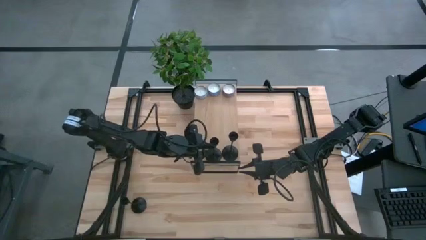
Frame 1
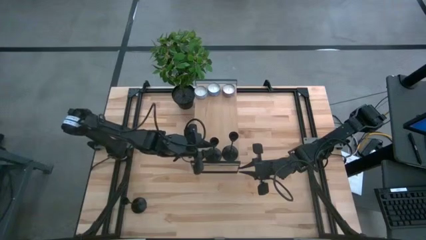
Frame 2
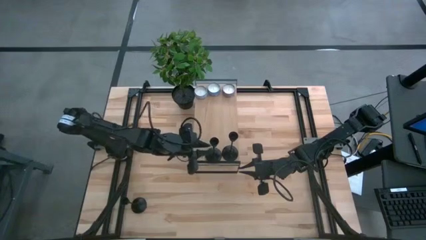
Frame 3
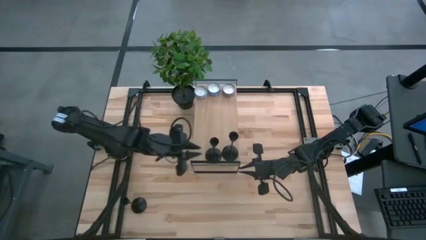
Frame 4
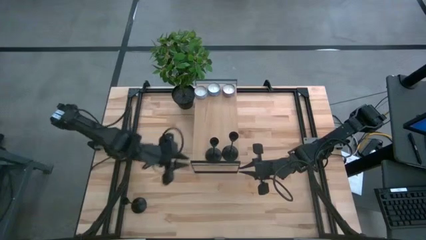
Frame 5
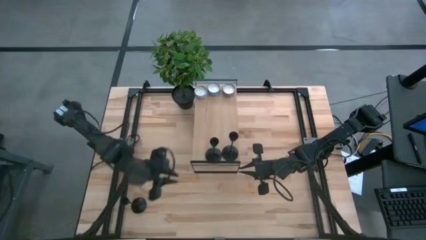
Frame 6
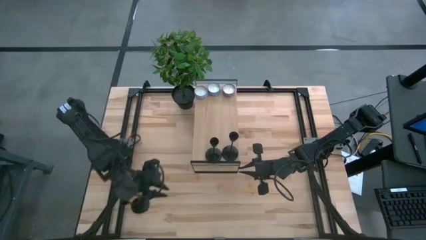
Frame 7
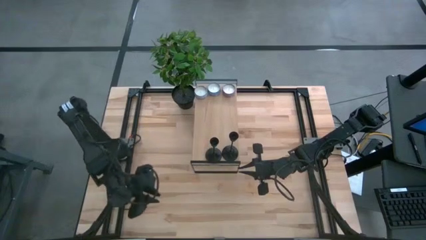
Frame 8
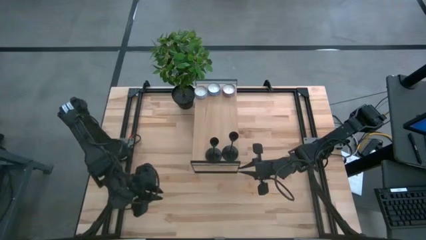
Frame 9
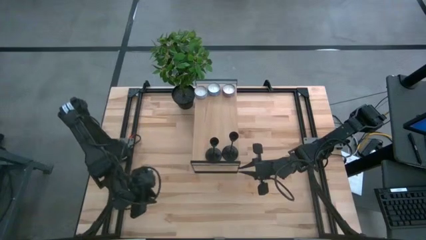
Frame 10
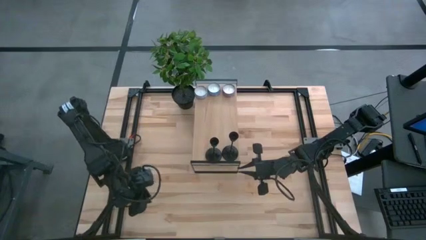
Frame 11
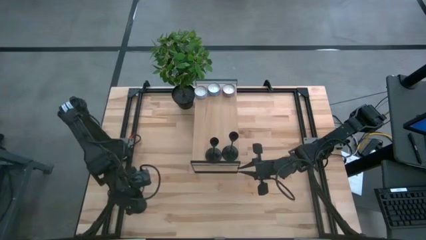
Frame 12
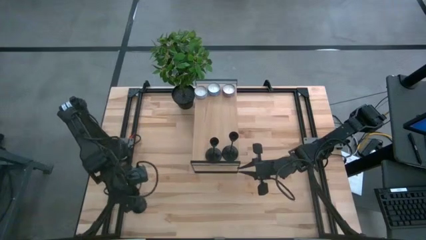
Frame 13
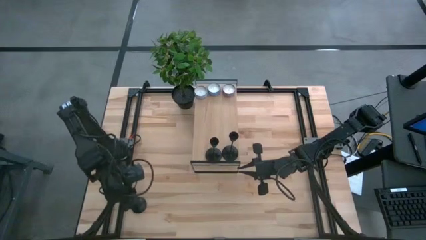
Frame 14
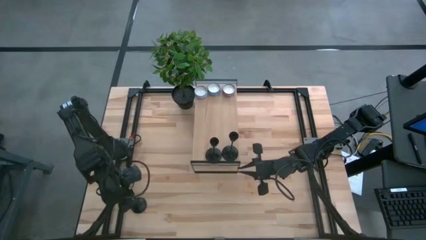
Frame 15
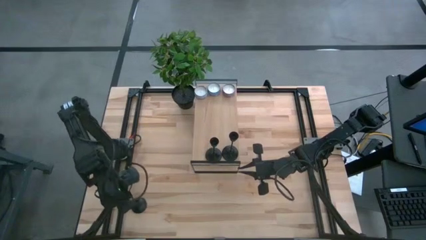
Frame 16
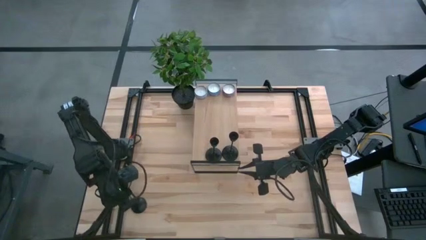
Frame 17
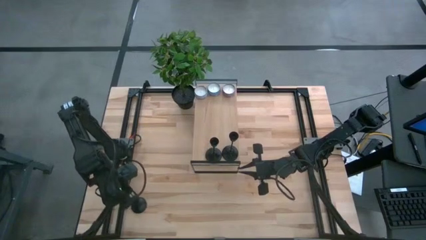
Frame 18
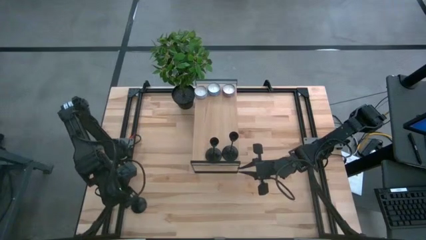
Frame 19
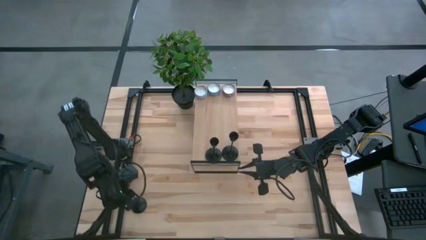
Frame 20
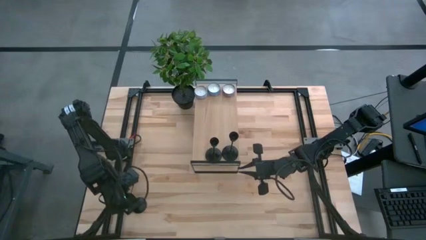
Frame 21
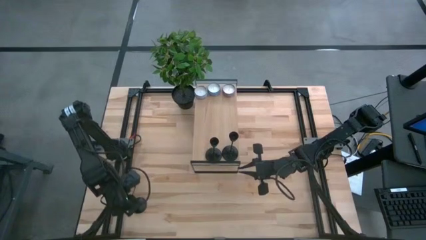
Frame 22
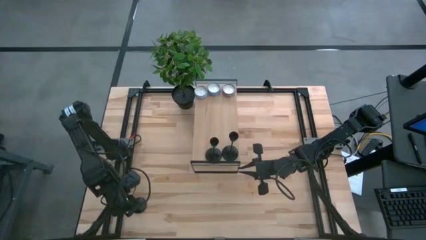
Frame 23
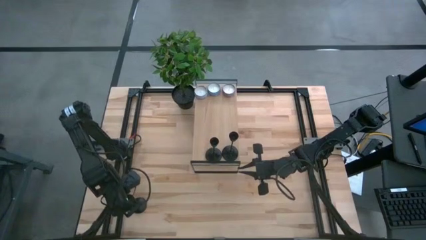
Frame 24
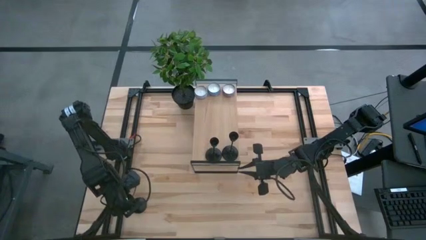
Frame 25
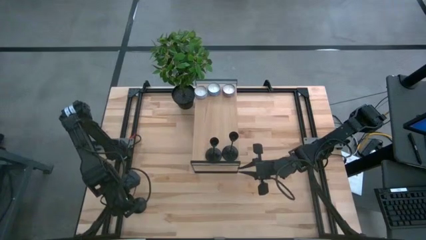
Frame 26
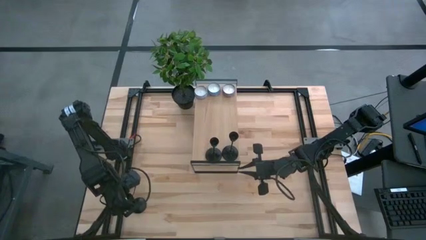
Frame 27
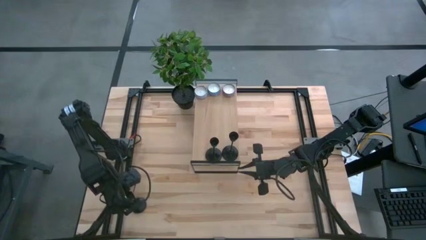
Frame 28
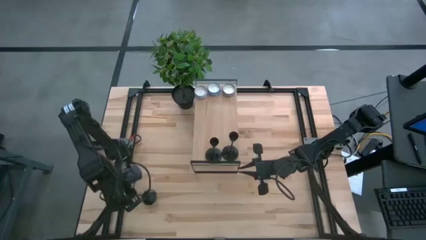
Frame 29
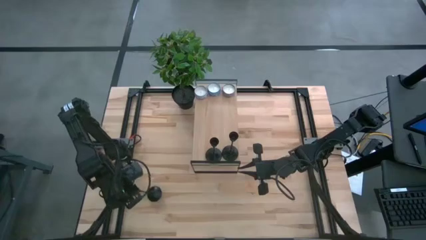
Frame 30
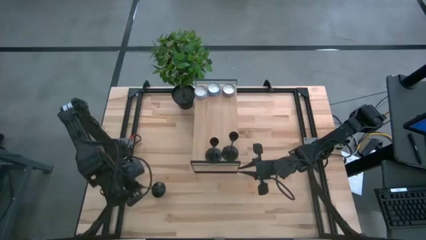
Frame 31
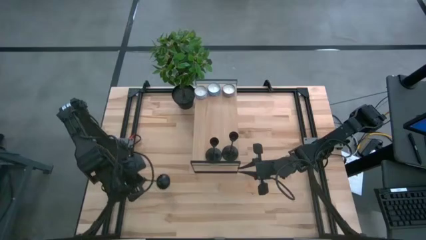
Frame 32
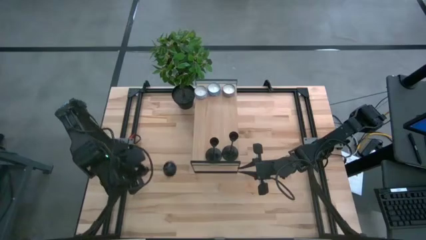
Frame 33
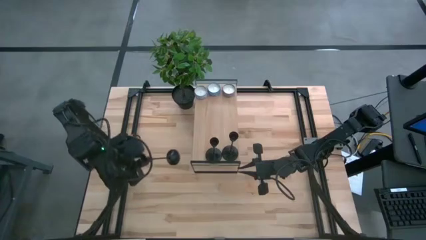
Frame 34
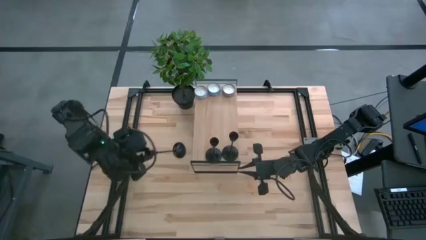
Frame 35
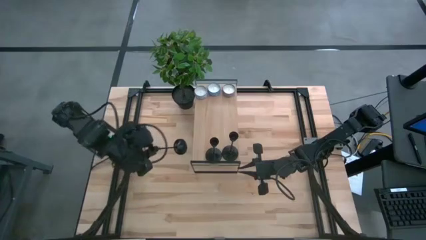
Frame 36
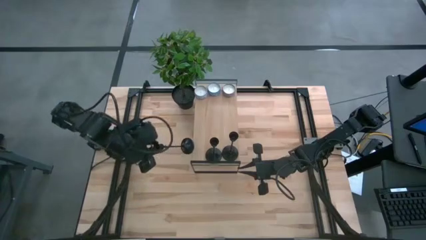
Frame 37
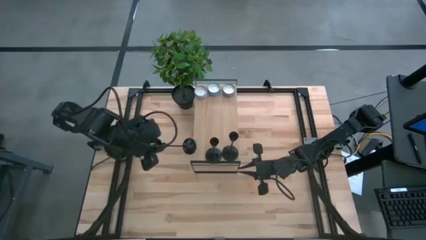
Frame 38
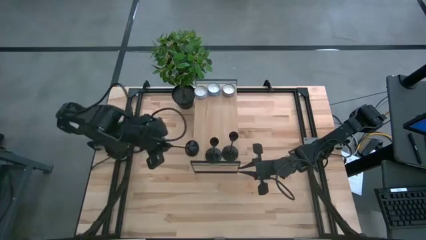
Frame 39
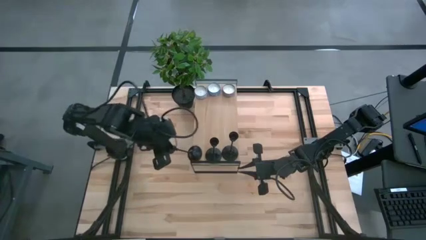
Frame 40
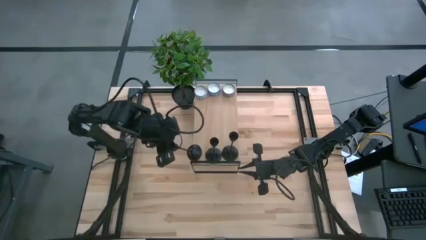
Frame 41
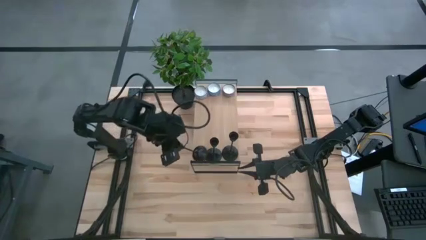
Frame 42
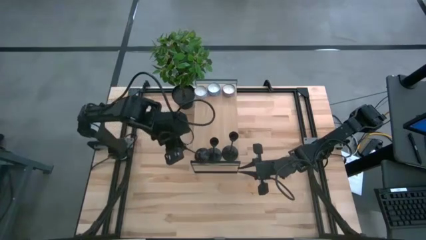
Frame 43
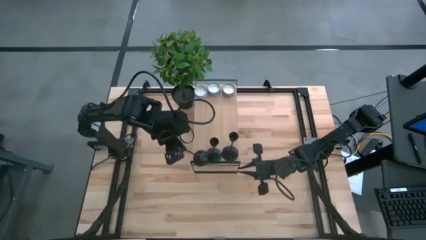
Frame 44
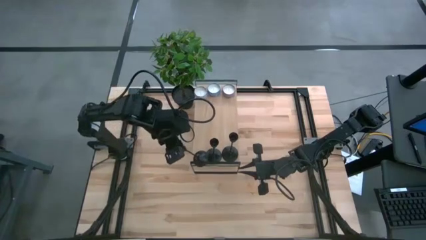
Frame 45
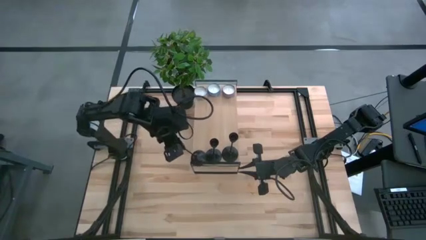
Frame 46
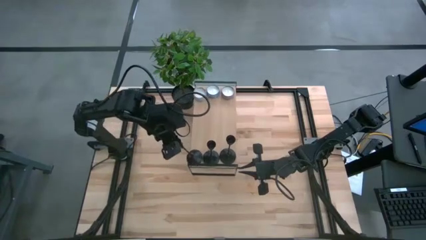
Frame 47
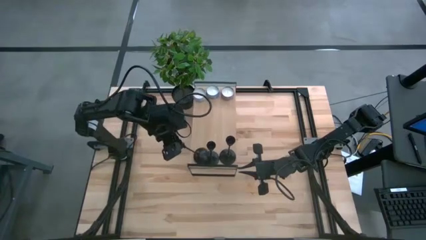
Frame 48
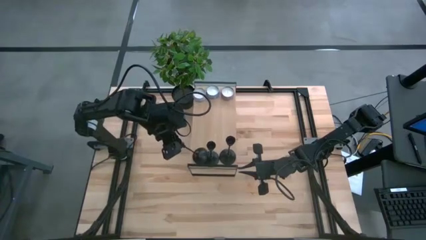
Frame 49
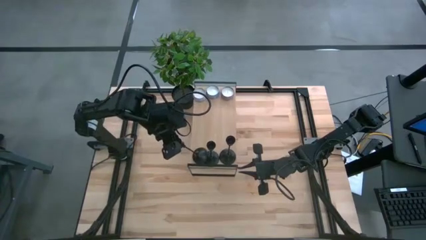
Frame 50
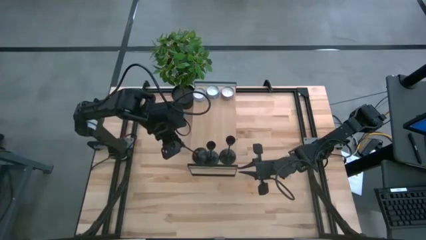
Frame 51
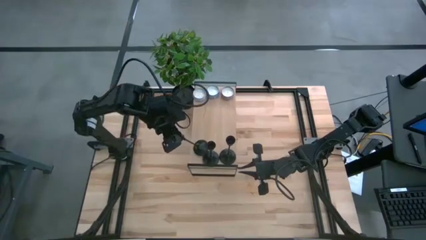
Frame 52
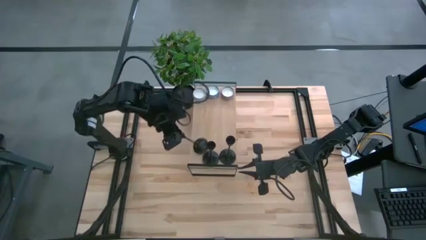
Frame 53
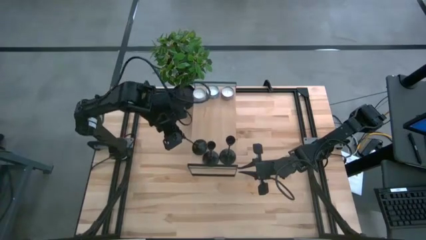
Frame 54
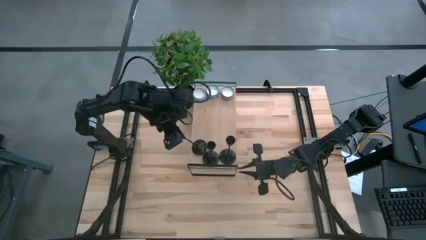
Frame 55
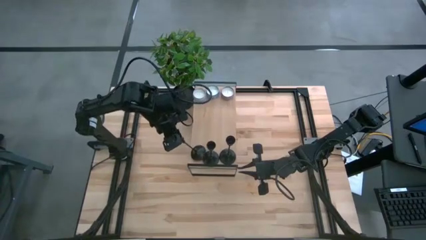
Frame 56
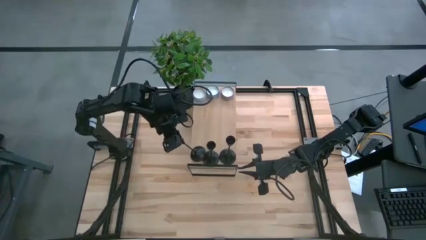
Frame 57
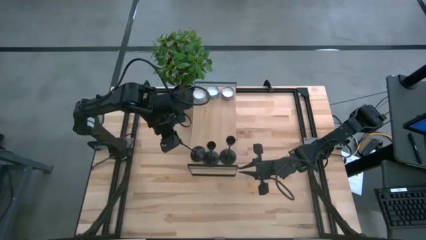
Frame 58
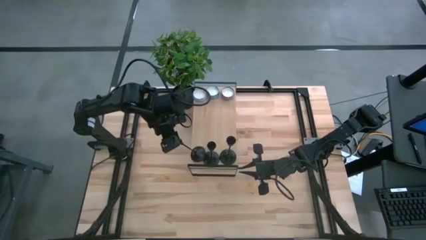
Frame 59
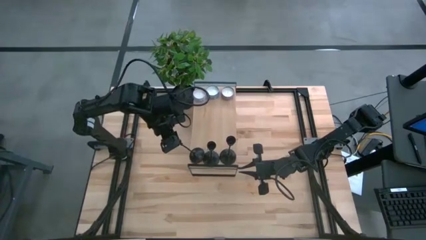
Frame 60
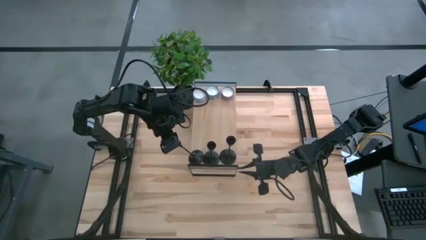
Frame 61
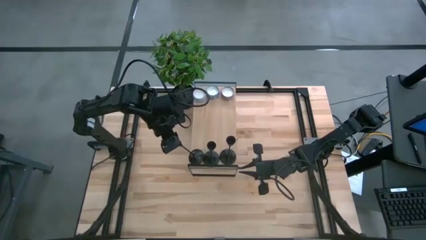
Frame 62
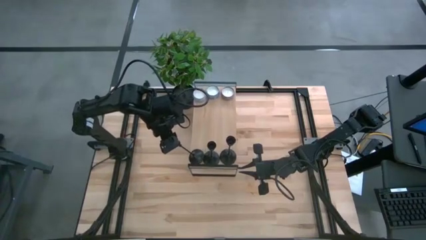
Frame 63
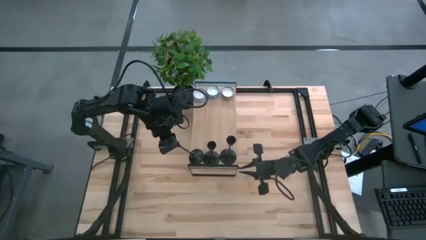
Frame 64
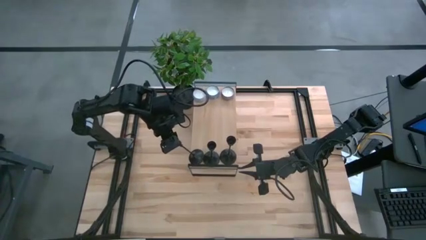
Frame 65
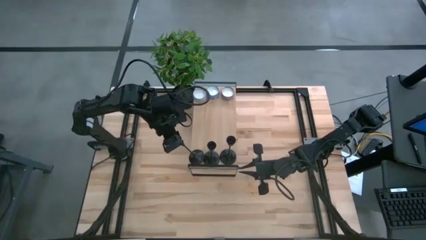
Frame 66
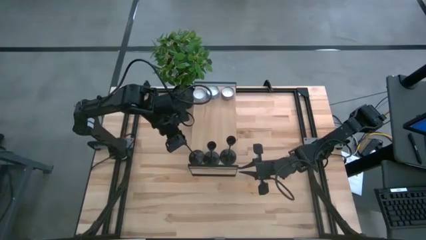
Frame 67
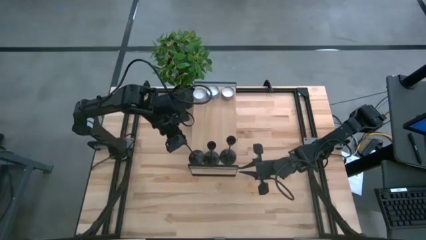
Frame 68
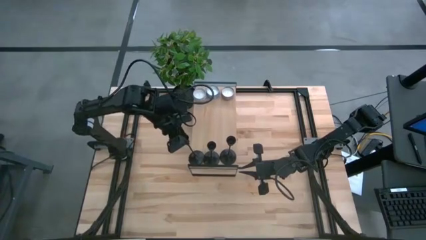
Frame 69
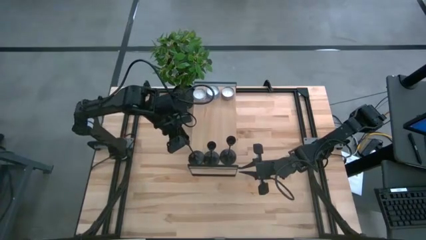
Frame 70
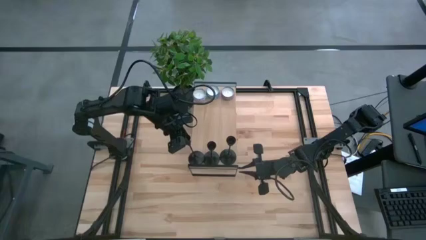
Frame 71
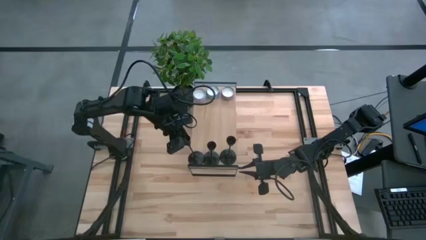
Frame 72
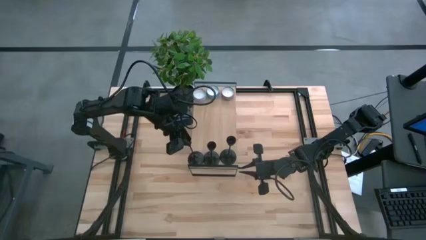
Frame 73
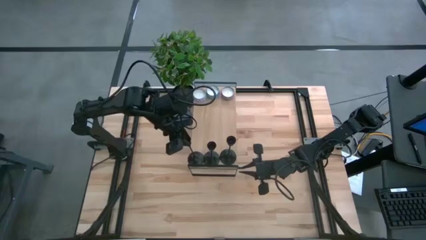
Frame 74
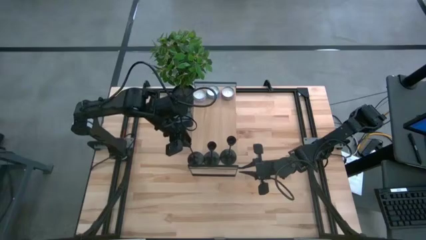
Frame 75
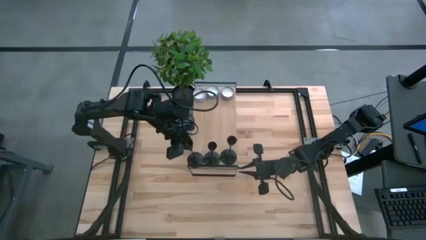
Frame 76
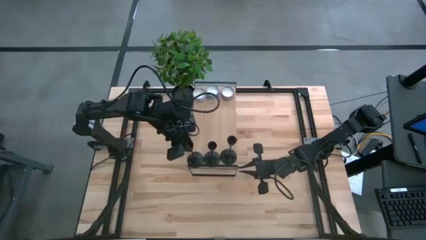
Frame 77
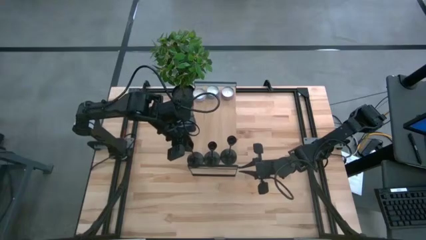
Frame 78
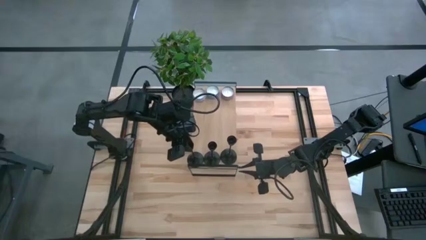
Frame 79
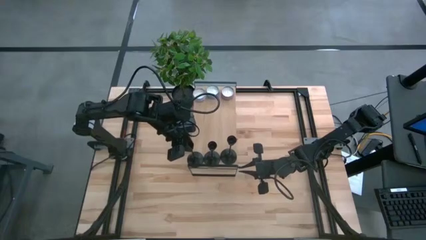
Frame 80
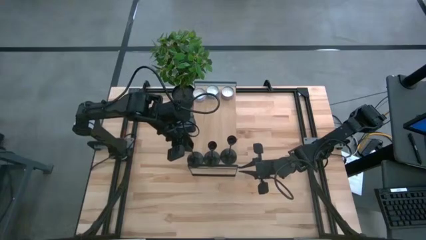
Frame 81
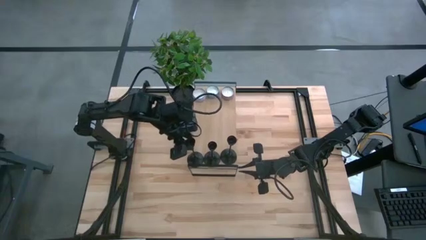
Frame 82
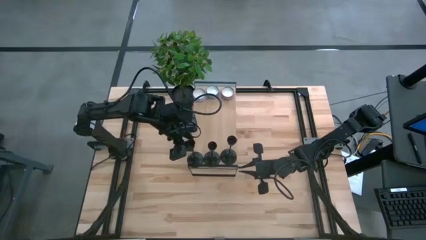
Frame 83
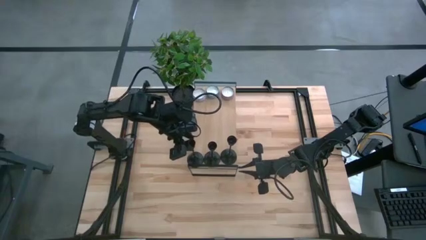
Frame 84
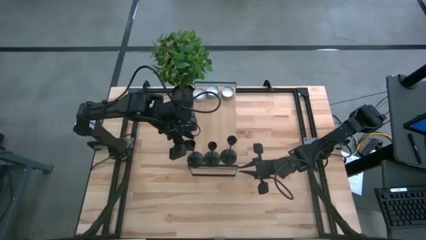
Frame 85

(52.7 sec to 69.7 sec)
Task: Pick & Place candle stick holders
Put the black candle holder on the shelf
